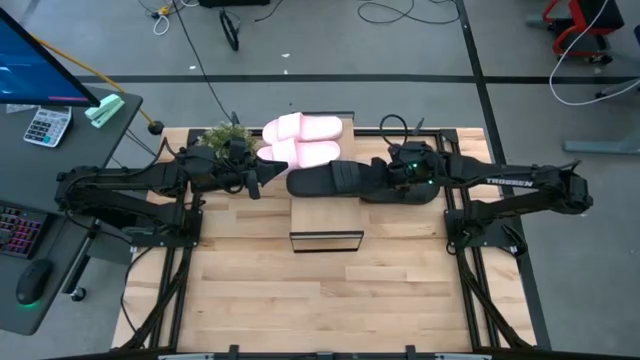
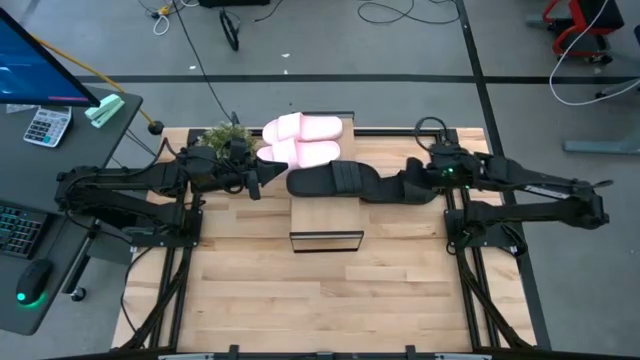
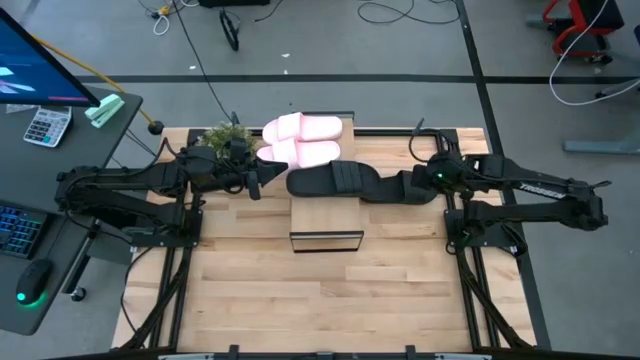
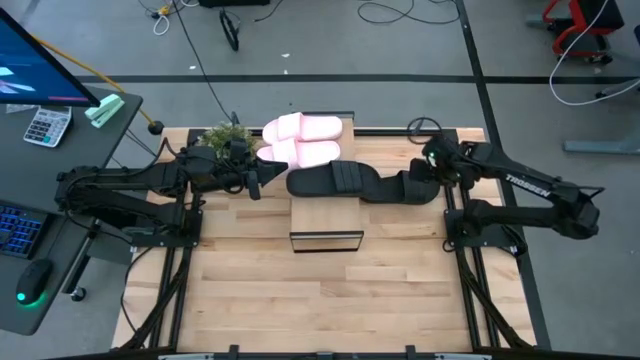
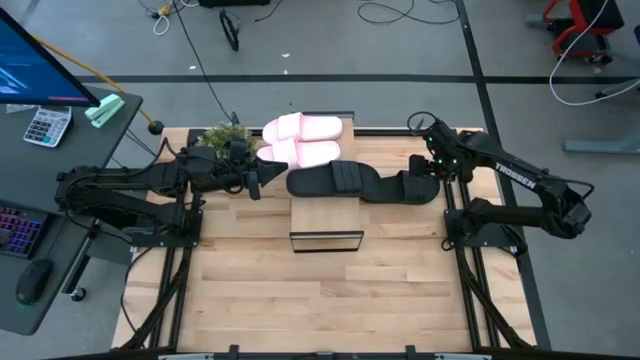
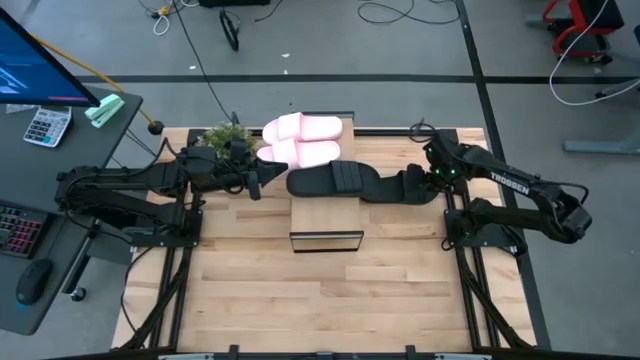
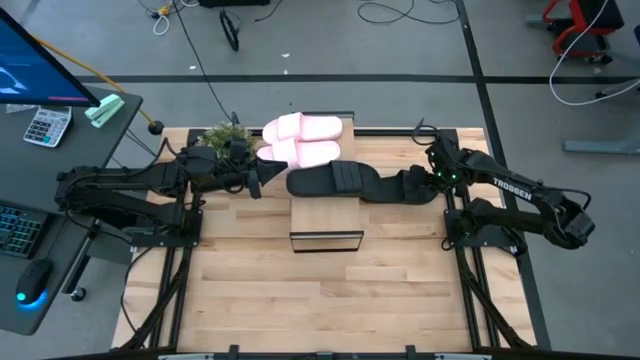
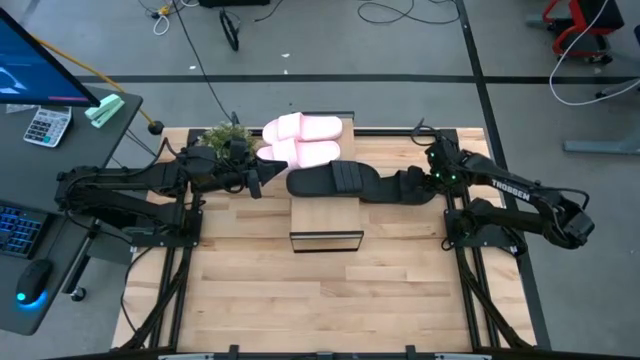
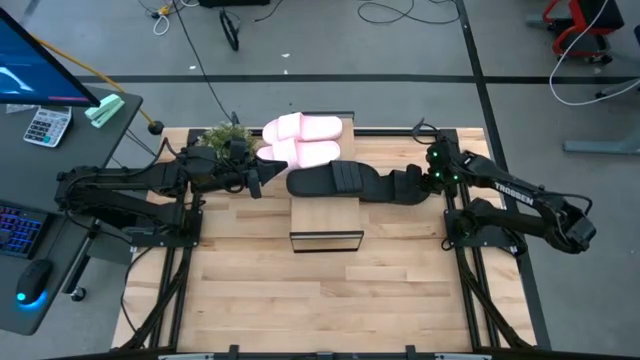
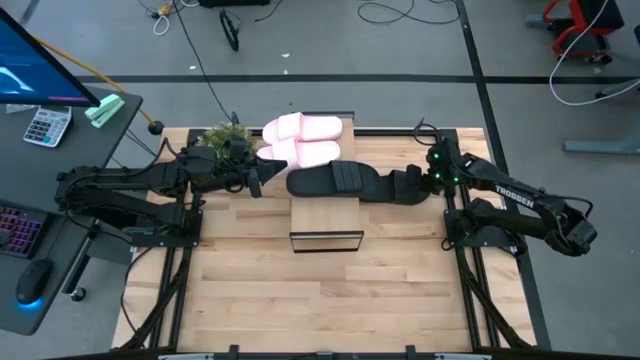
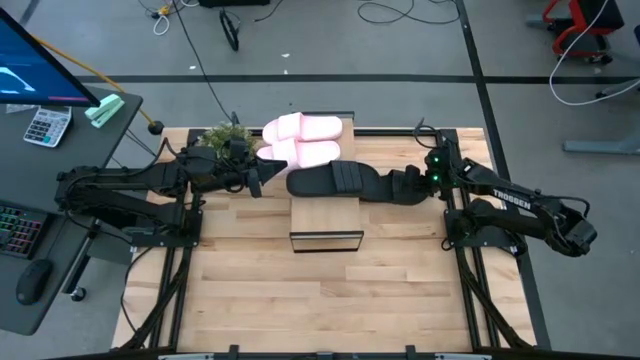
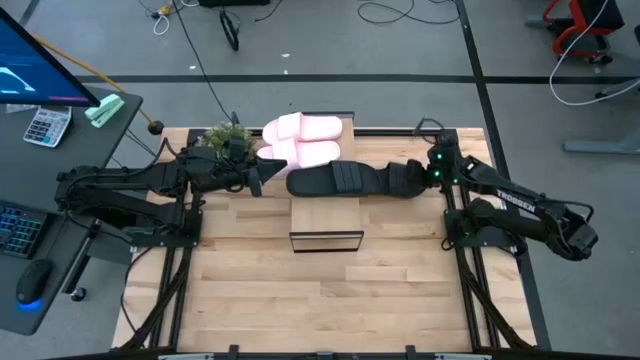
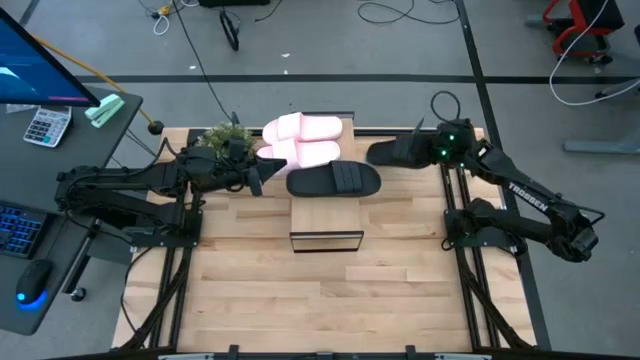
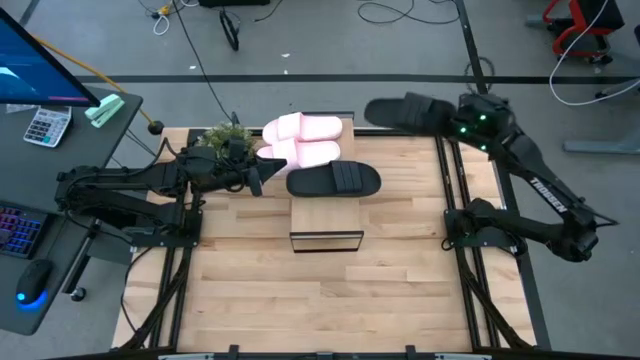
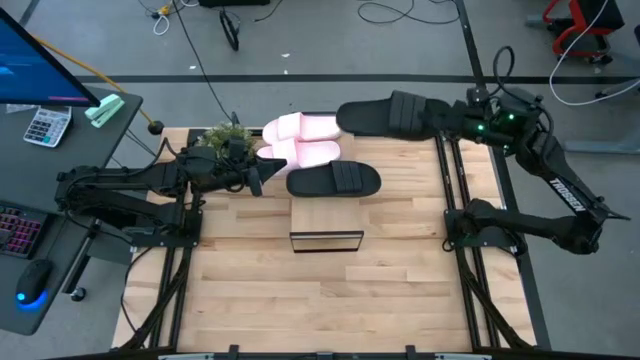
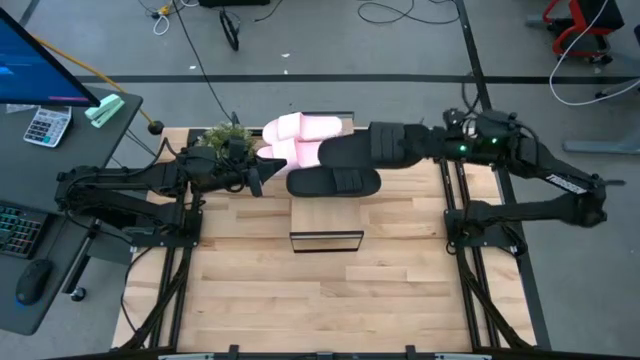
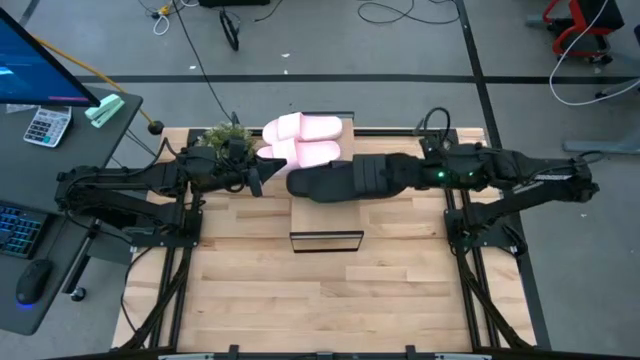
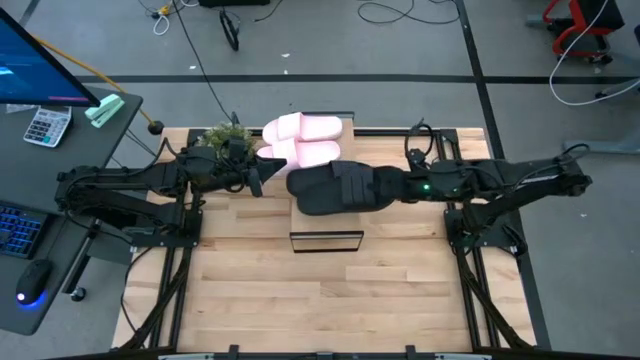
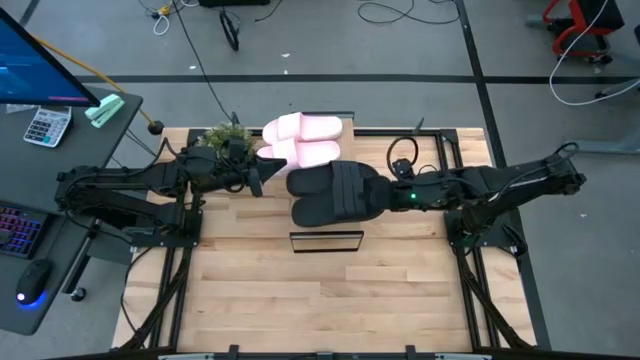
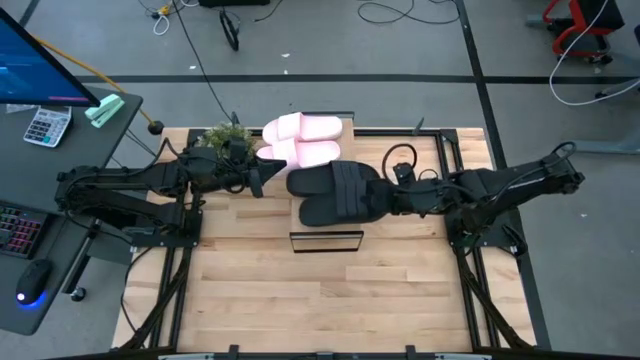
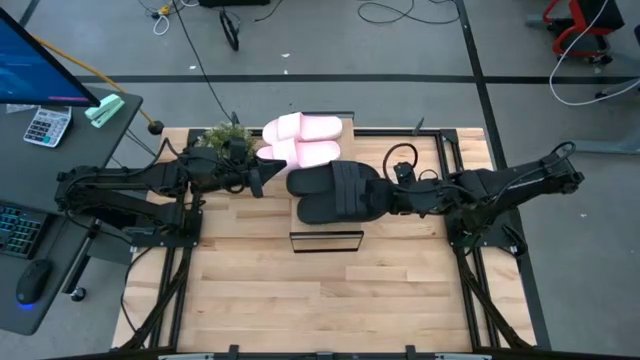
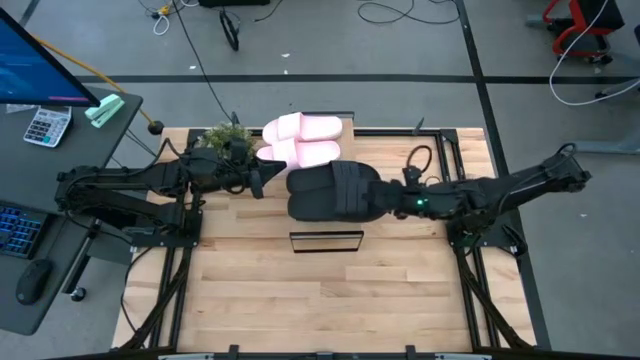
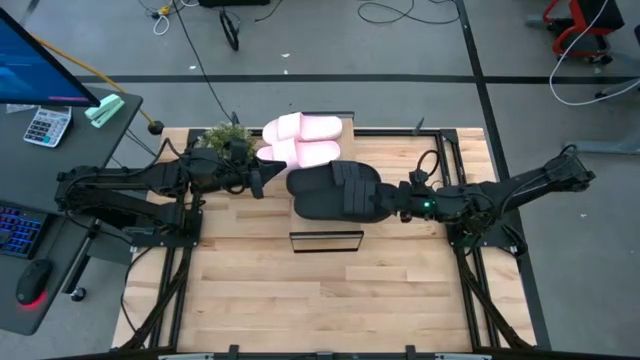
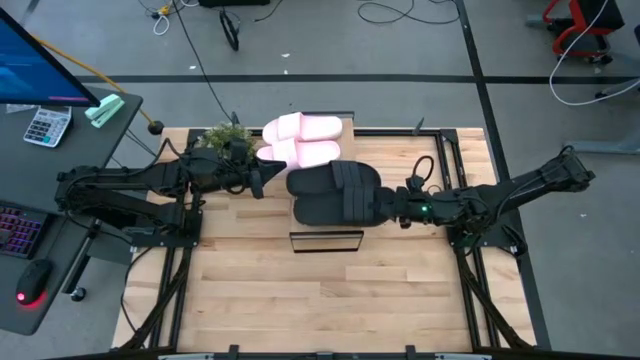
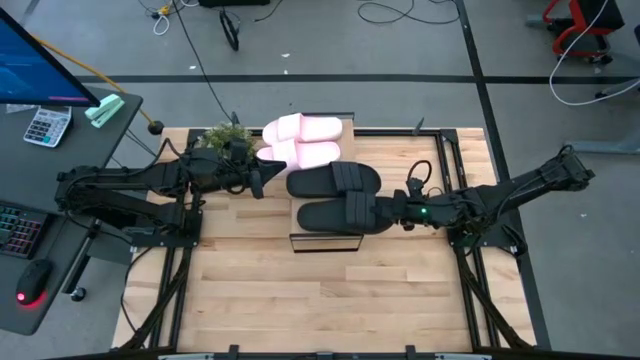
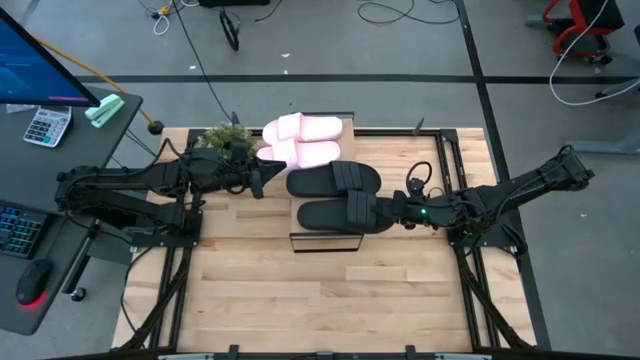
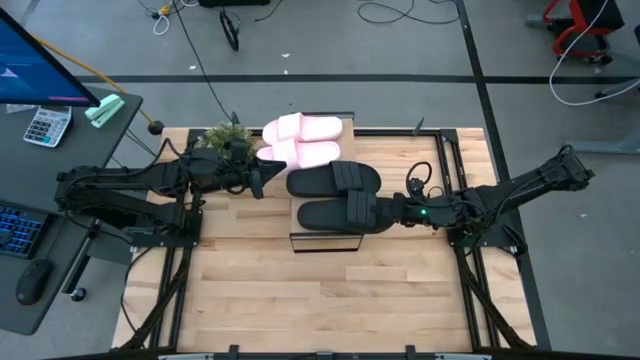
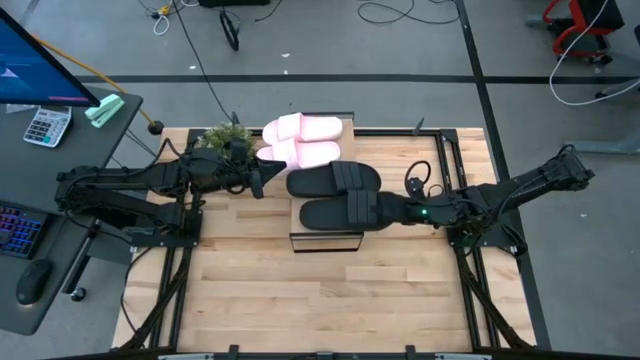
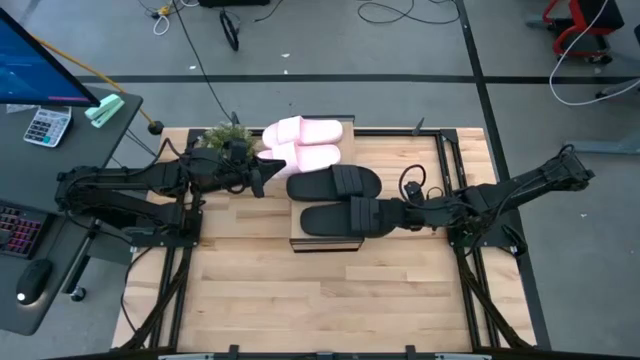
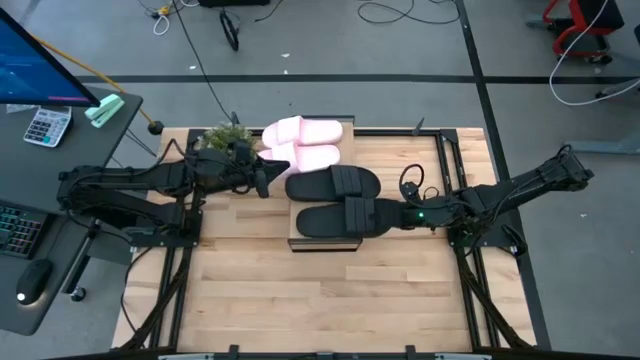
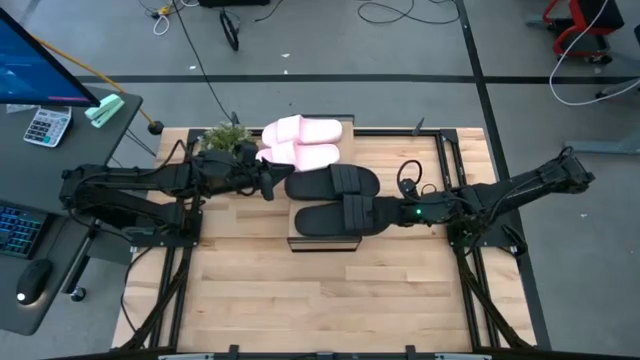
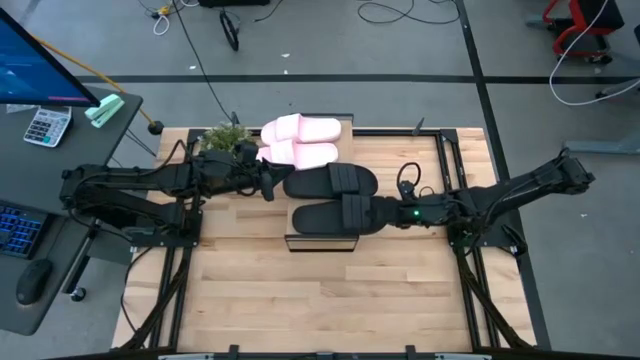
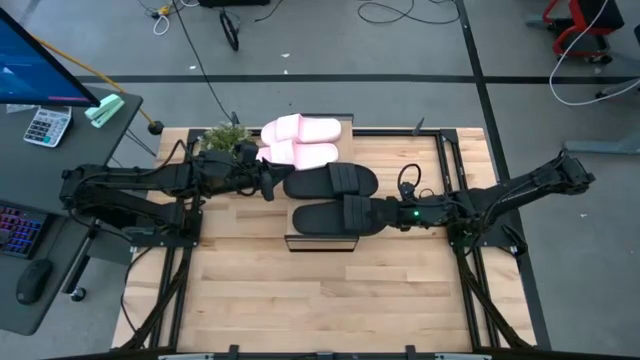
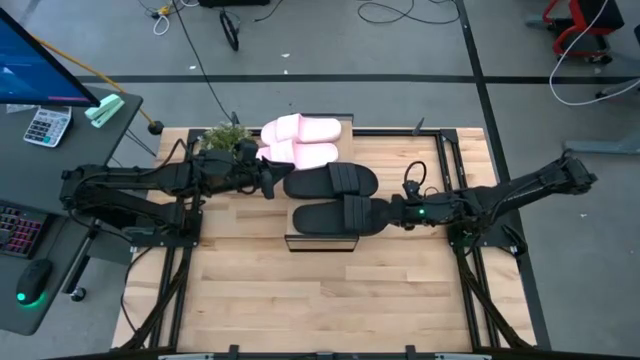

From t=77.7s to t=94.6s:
Task: Pick and place slides into the shelf
Put the black slipper on the shelf

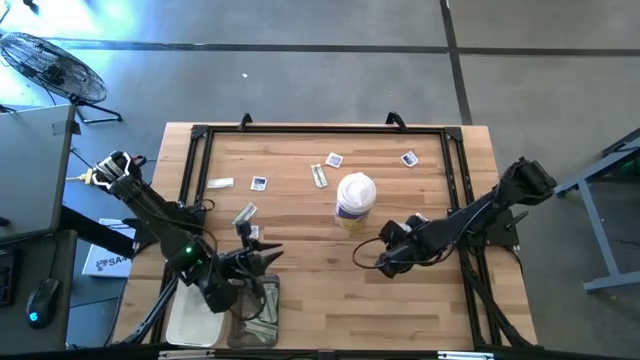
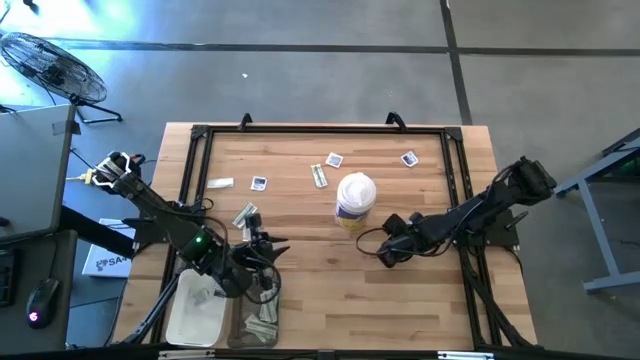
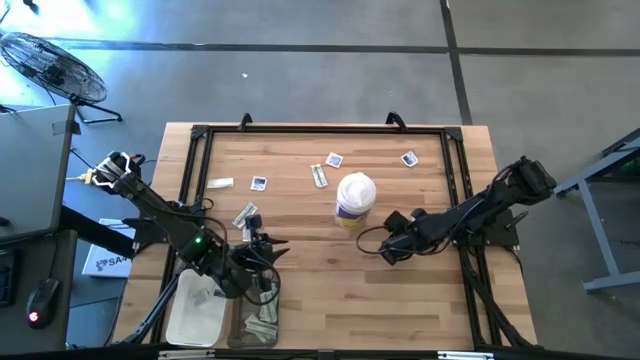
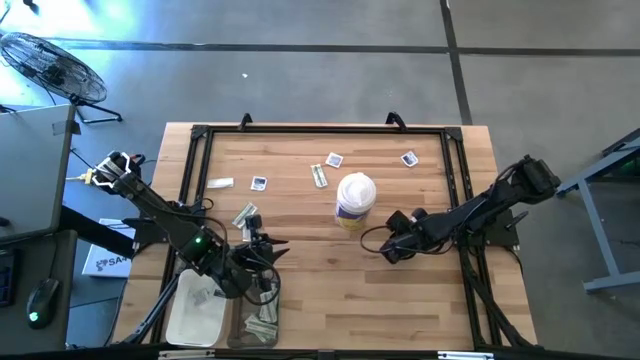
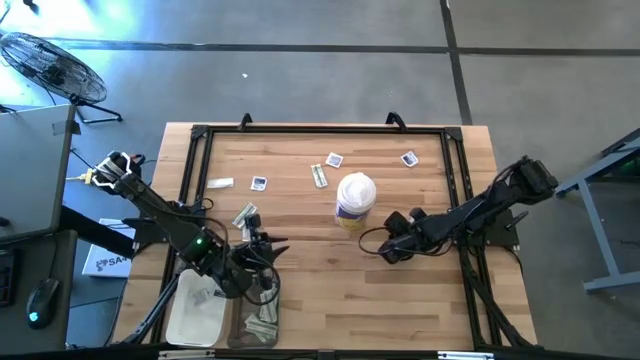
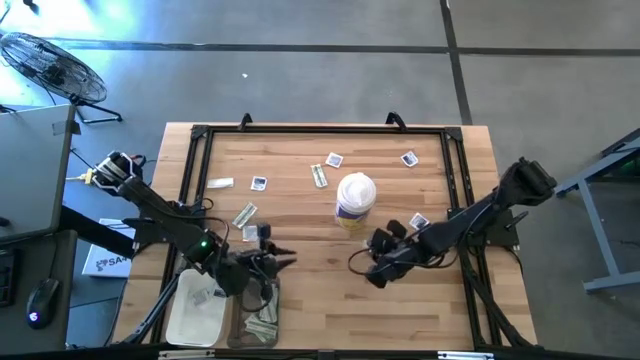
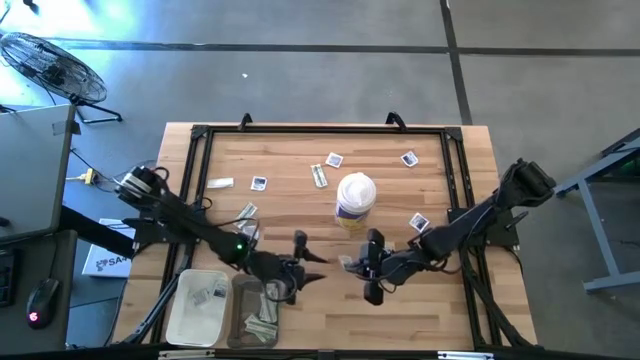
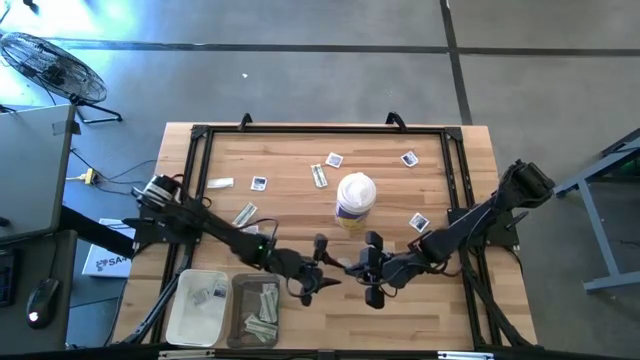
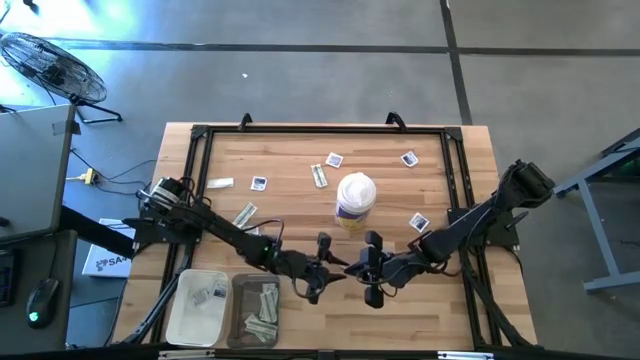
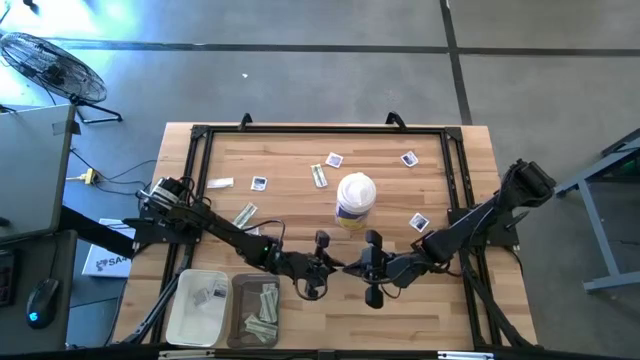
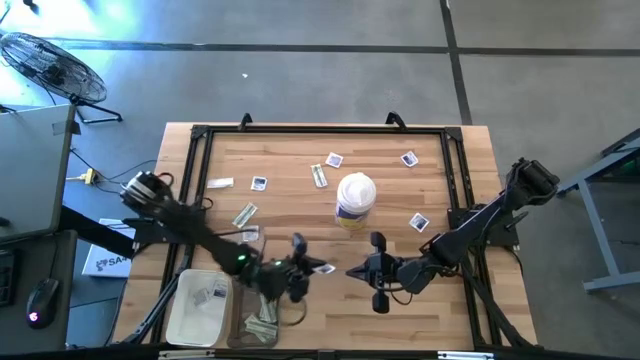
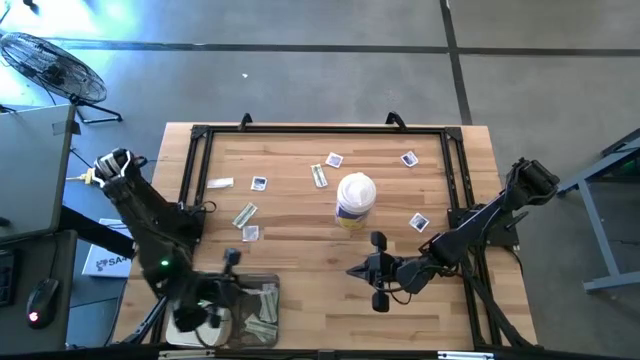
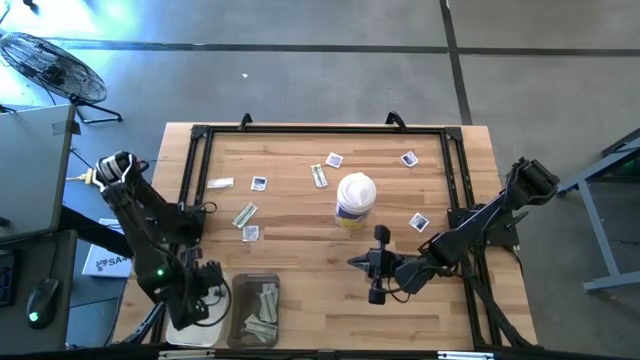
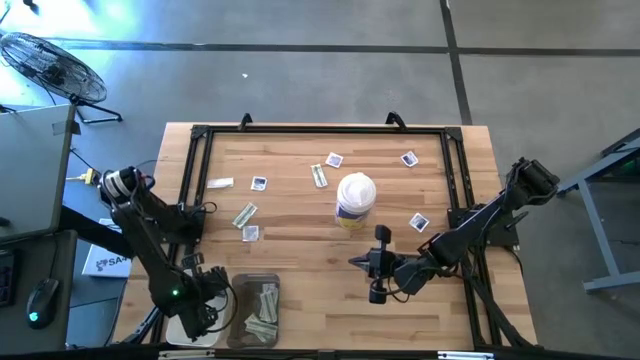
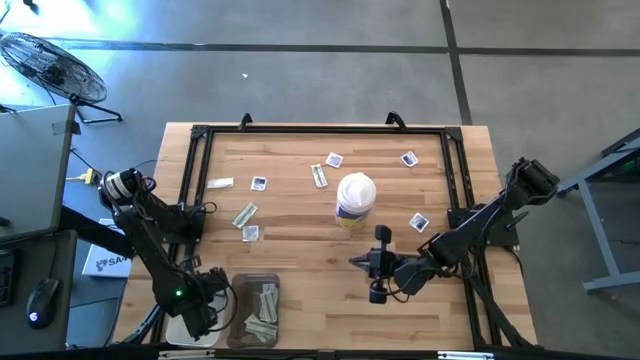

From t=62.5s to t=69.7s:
Task: Pick & Place First Aid Supplies
Put the alcohol pad into the white bin
